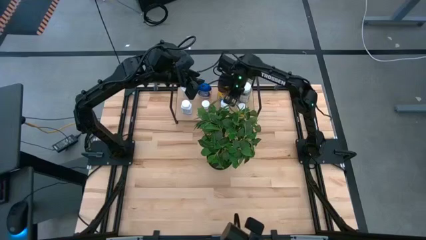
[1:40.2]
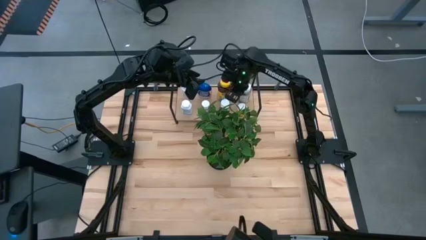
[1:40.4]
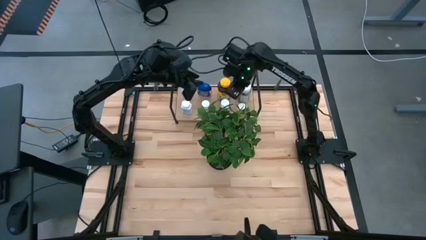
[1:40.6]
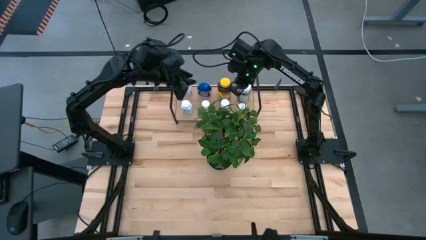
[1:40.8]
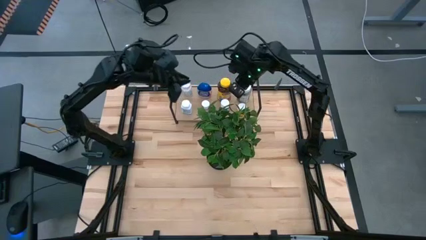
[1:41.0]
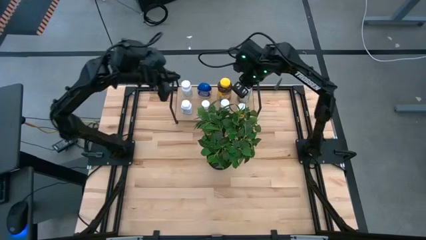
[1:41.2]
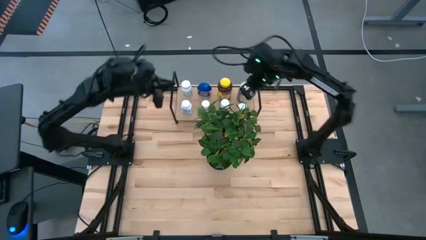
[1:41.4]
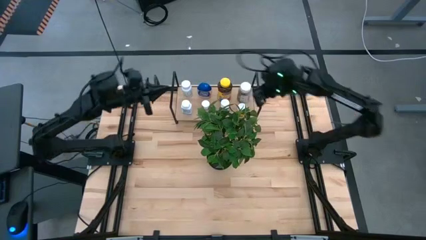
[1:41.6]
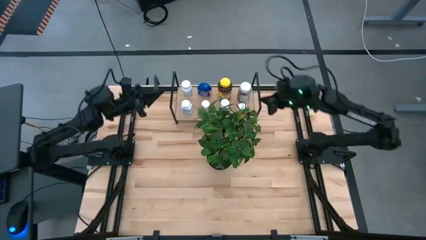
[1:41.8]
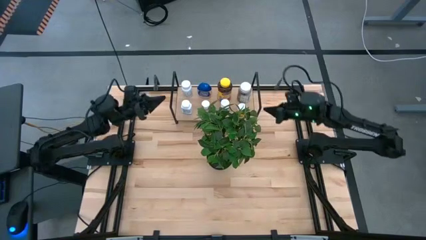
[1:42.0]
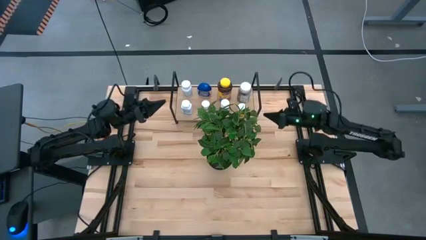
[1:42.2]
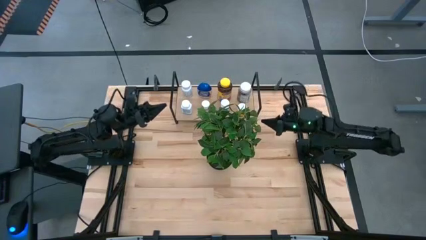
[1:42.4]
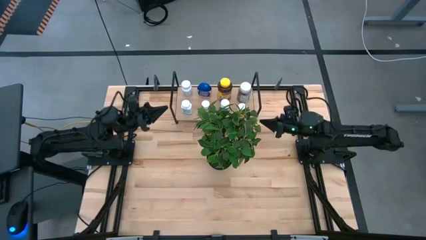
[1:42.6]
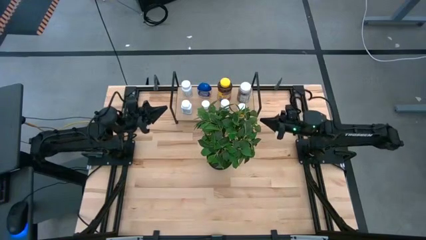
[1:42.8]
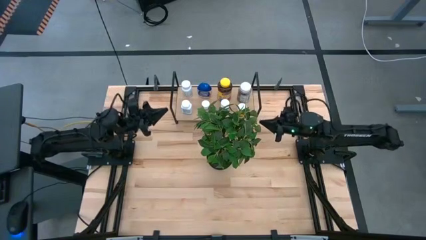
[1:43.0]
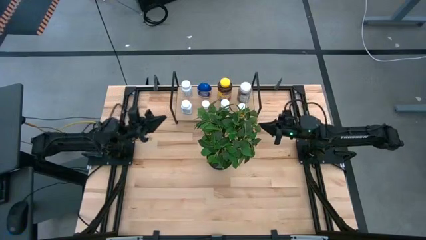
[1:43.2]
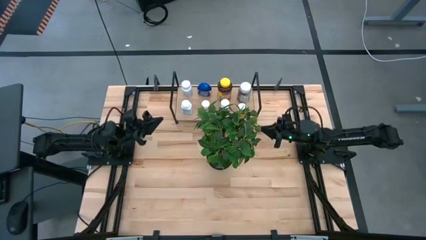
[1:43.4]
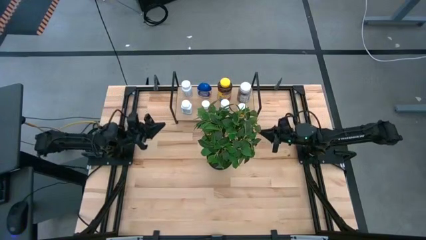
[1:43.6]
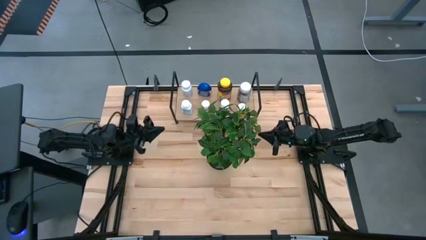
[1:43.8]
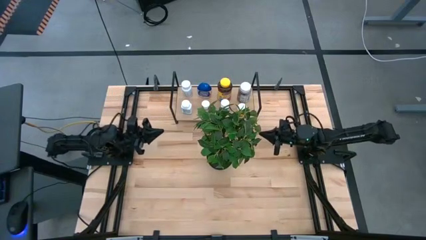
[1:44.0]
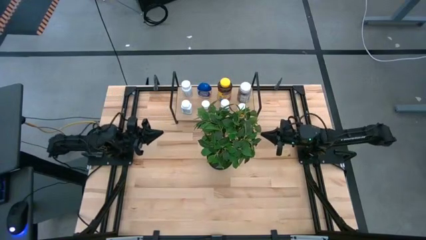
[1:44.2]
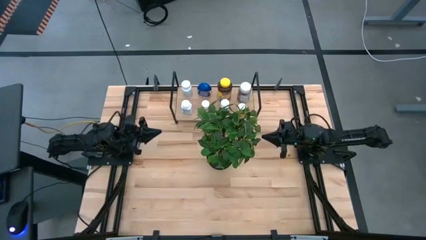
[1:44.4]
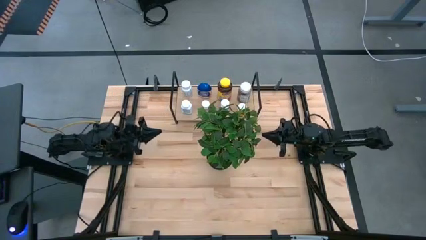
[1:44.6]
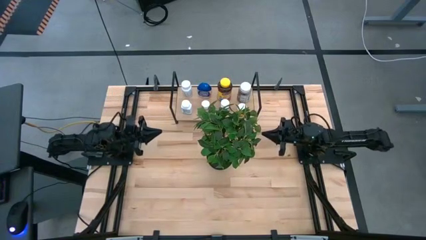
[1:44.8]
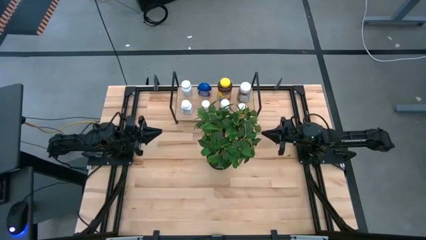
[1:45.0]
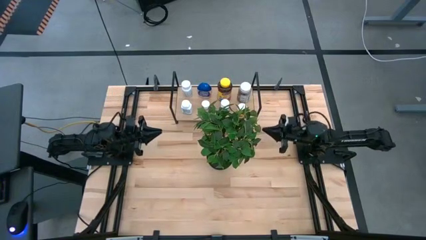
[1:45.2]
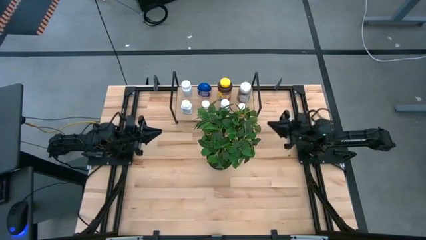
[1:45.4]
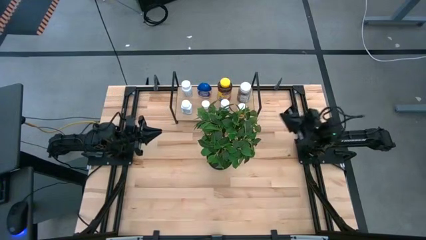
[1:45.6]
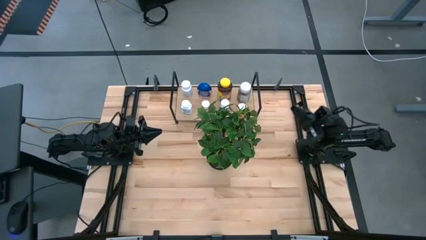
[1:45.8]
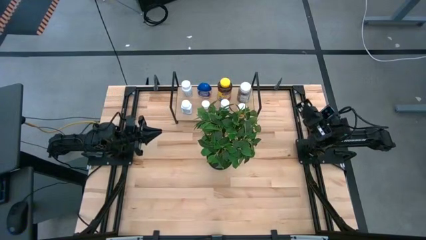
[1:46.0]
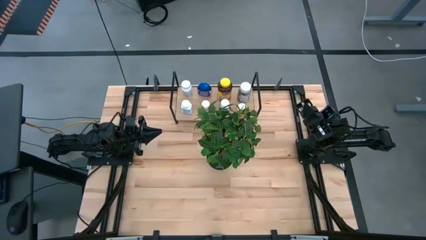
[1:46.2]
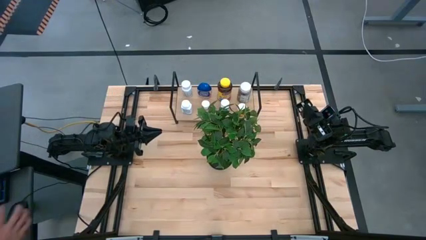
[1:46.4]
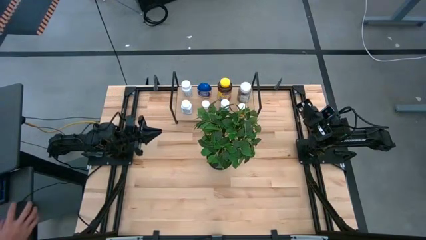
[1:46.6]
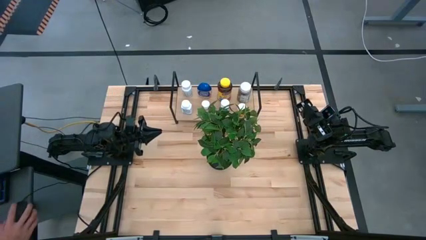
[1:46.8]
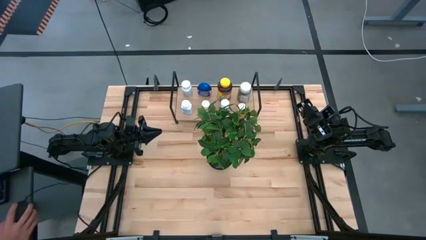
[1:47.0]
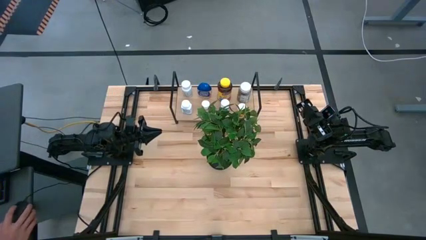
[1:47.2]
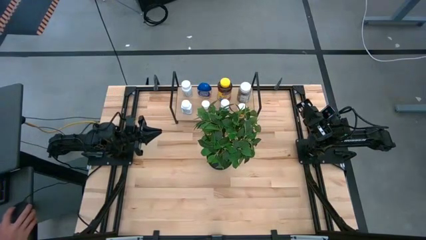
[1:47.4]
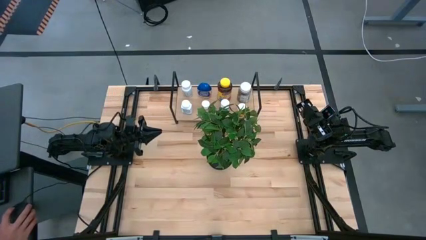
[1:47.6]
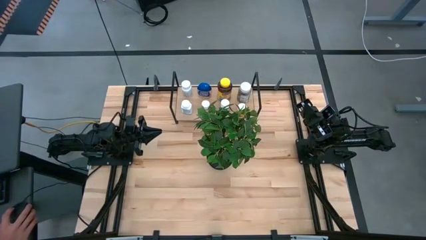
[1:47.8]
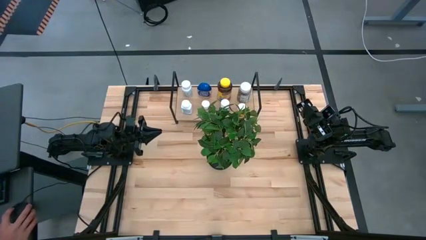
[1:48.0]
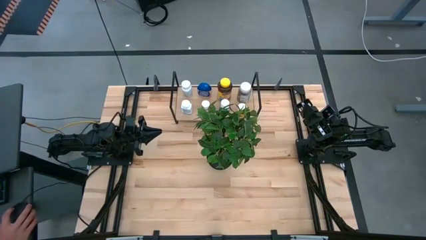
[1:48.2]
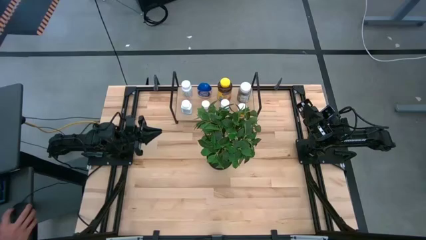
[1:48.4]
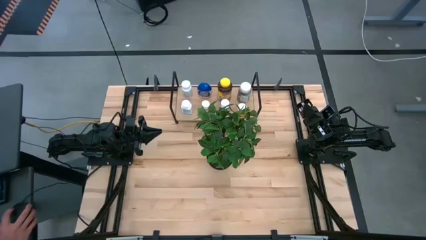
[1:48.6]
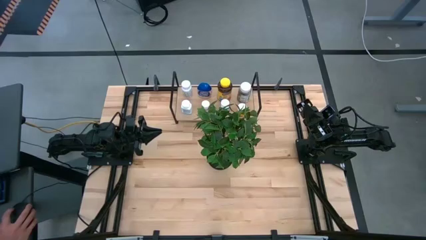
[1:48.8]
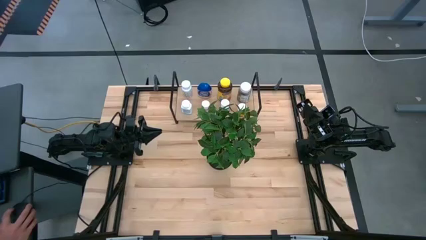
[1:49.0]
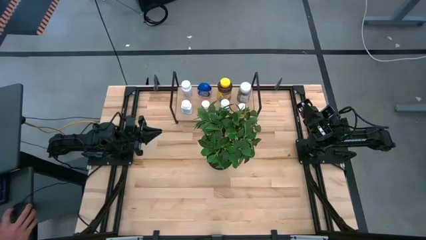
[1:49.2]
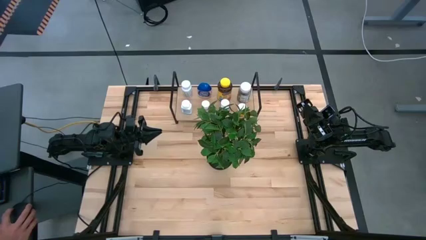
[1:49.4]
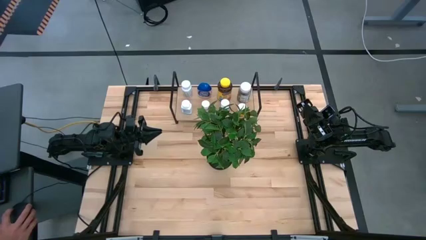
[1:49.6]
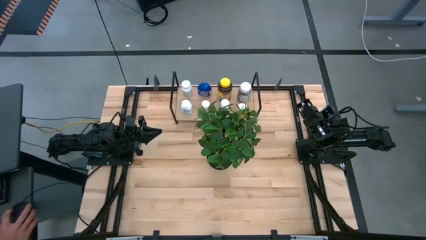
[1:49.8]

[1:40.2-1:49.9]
Task: Pick and place medicine bottles onto shelf by color
Return to Home Position

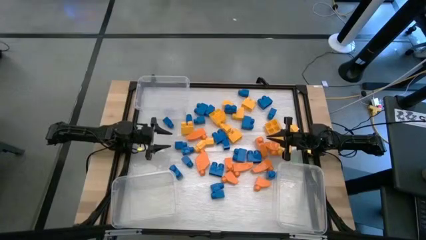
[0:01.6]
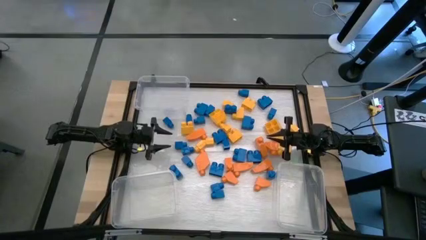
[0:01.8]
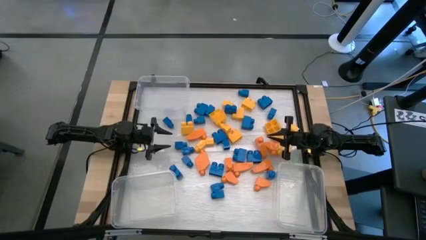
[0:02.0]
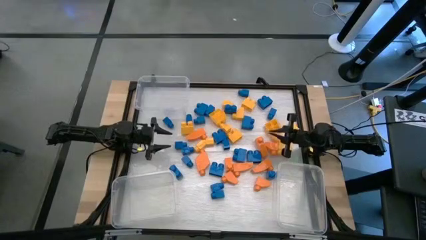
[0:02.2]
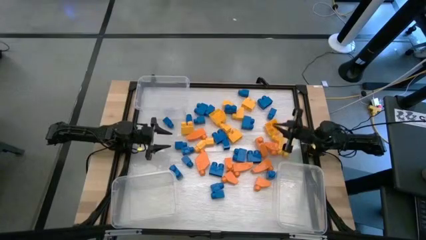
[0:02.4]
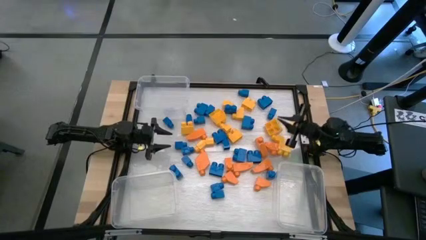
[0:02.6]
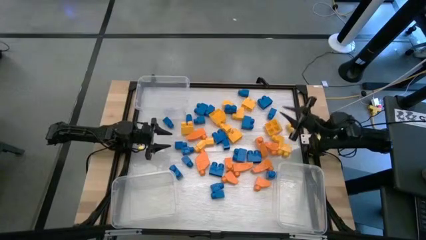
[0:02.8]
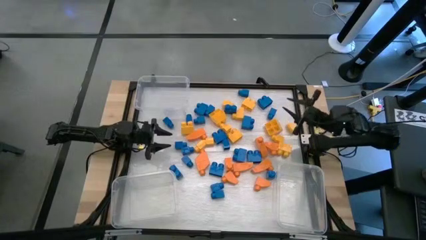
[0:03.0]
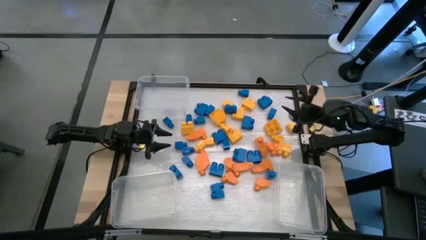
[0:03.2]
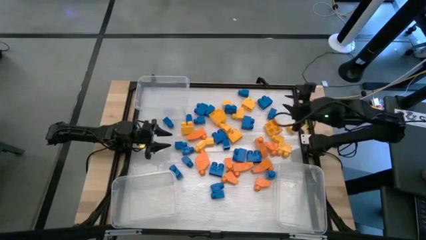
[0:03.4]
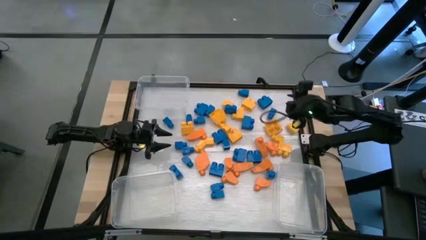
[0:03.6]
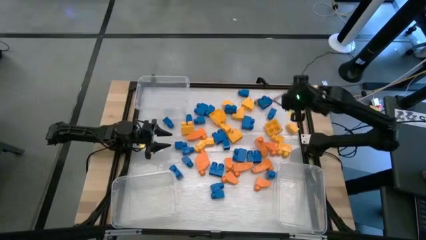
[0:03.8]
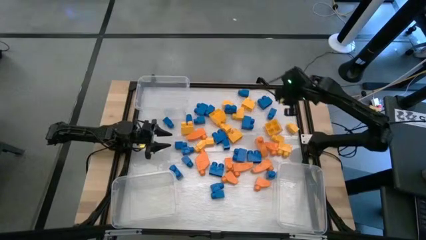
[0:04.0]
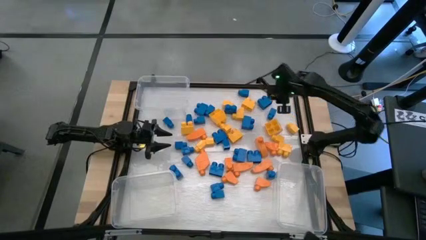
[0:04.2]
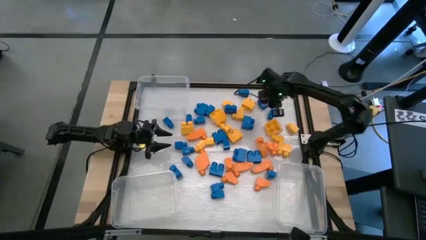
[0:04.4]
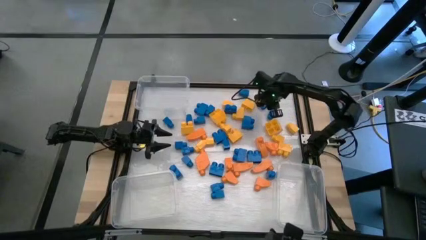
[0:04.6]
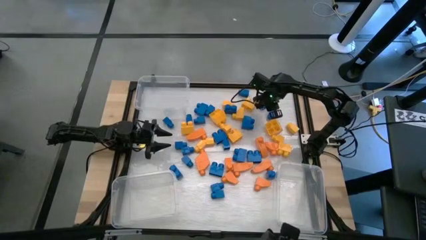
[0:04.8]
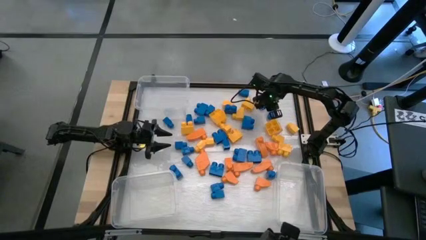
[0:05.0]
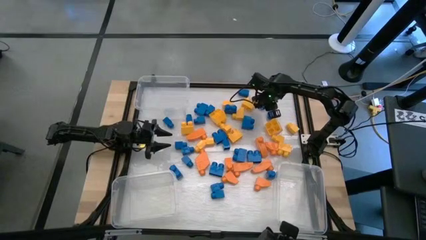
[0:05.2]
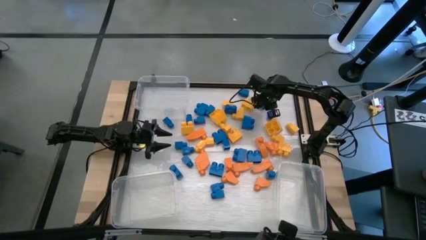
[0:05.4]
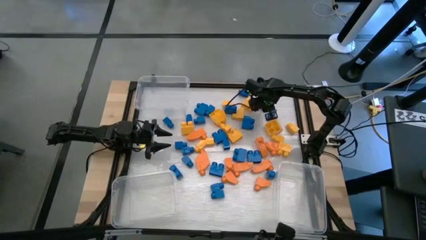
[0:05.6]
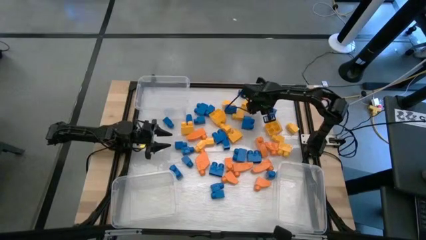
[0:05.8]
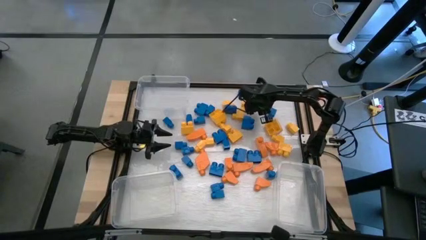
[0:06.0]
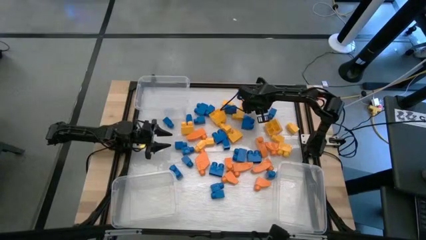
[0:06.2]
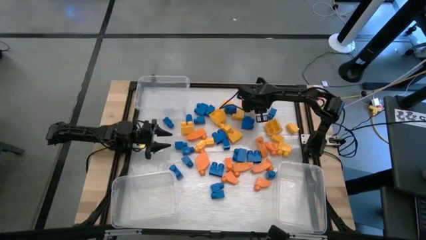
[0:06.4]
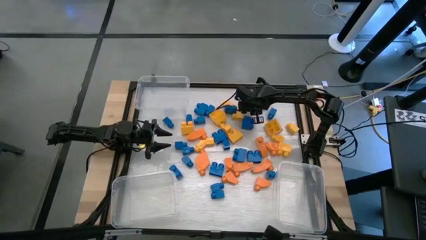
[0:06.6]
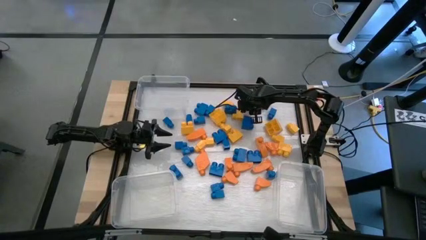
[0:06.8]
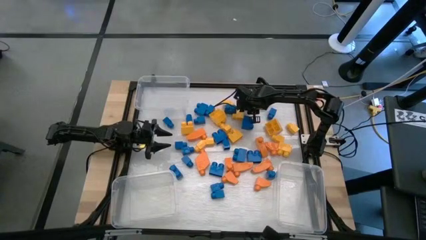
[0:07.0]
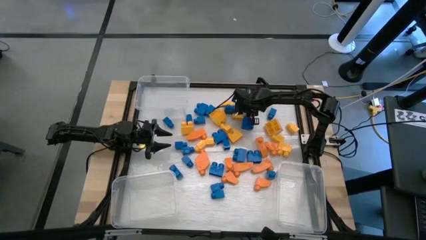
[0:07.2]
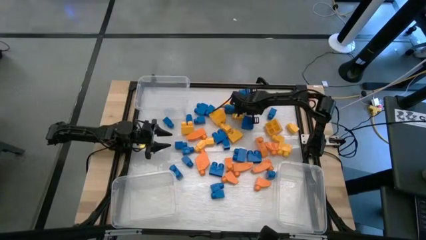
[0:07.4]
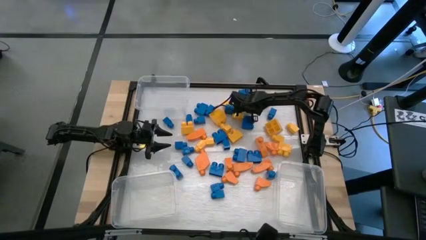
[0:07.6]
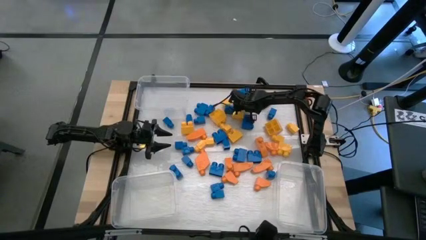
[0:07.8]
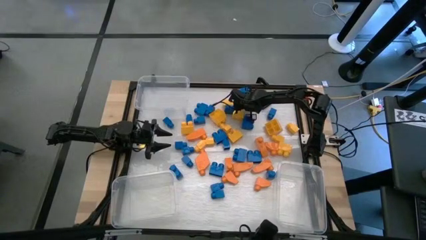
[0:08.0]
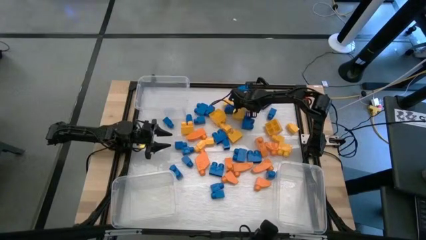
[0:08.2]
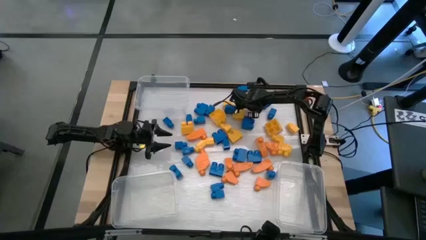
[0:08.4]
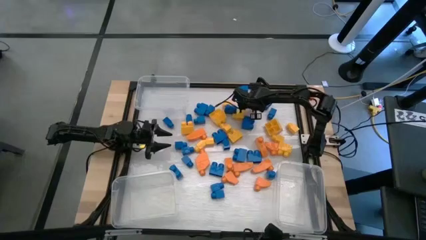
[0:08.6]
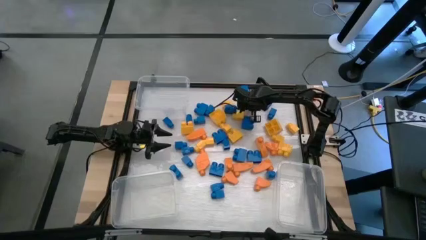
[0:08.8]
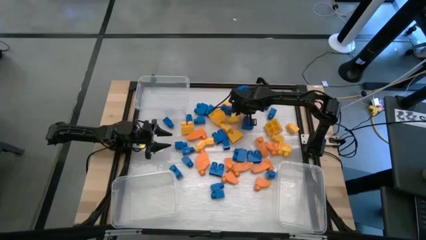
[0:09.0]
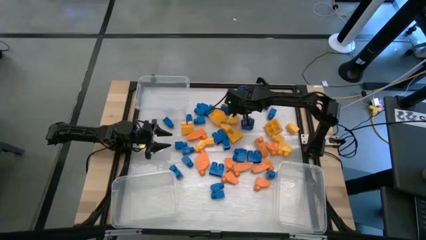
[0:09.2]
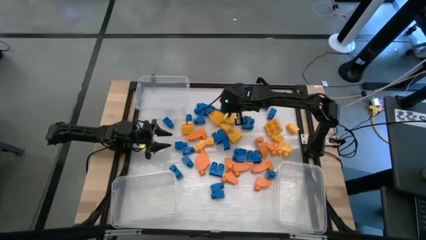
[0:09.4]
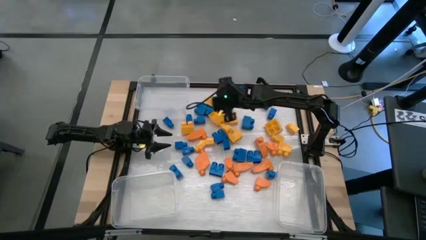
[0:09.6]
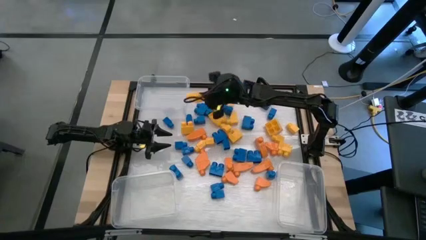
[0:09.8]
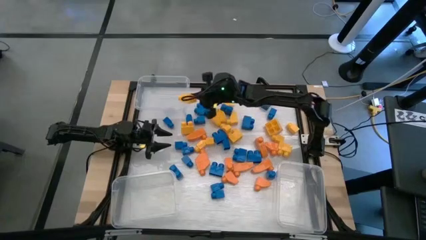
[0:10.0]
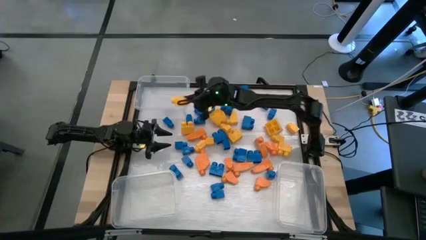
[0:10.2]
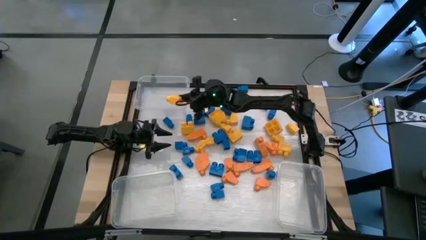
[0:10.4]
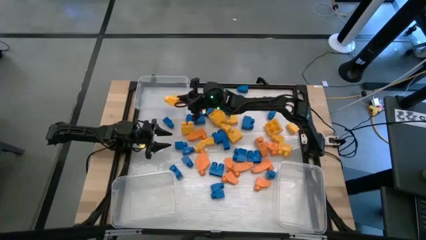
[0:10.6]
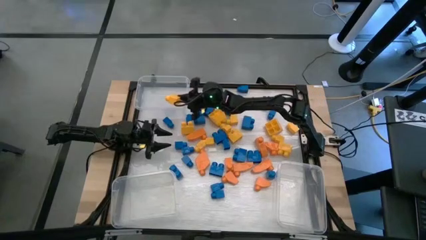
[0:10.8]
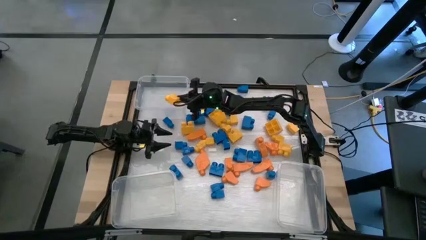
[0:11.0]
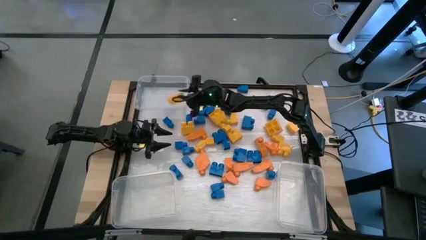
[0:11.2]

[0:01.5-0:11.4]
Task: Sort blocks
Put the yellow game piece into the top transparent bin
